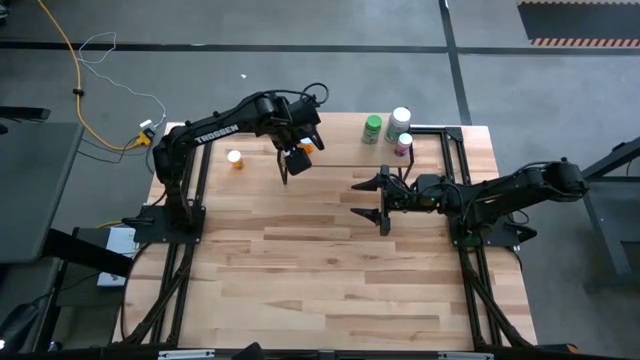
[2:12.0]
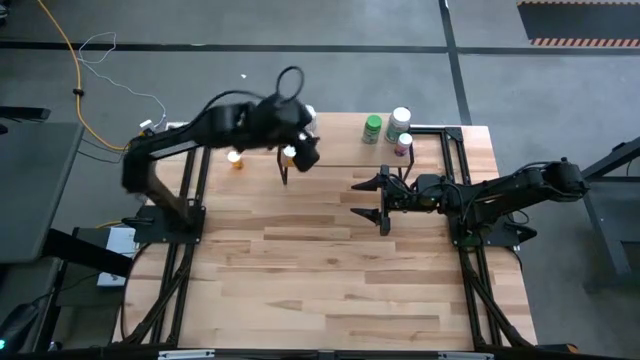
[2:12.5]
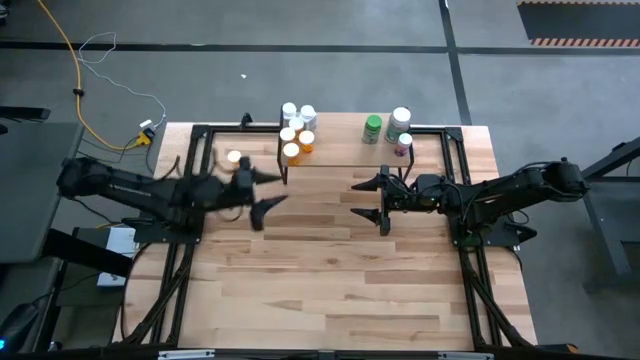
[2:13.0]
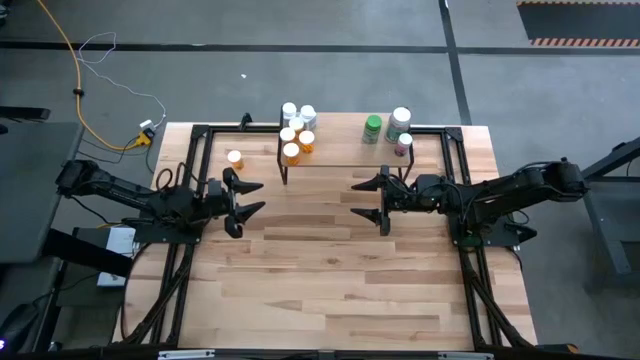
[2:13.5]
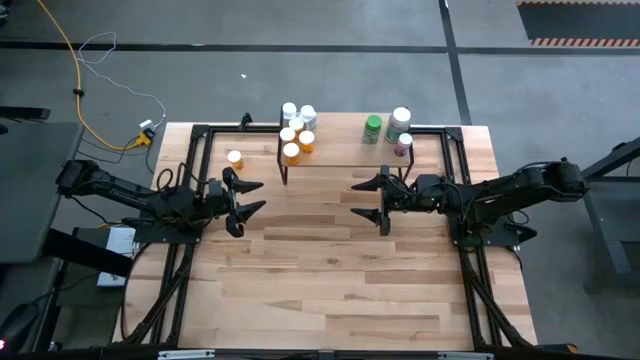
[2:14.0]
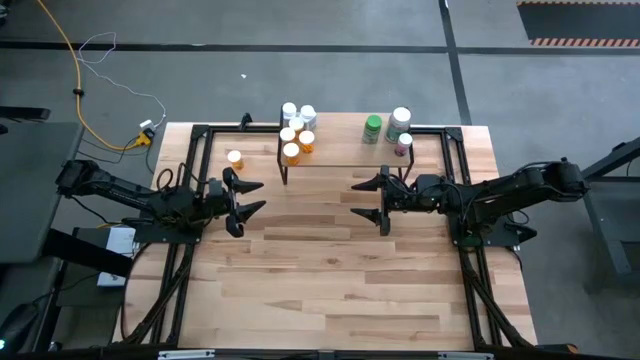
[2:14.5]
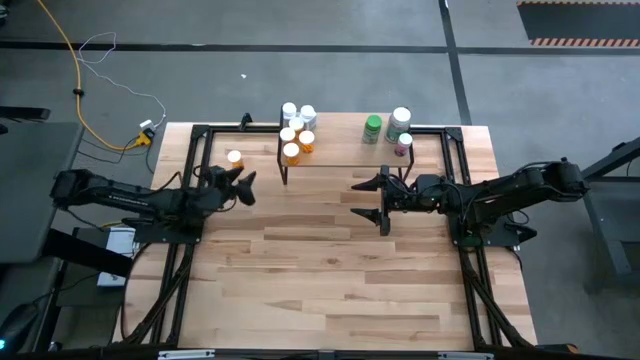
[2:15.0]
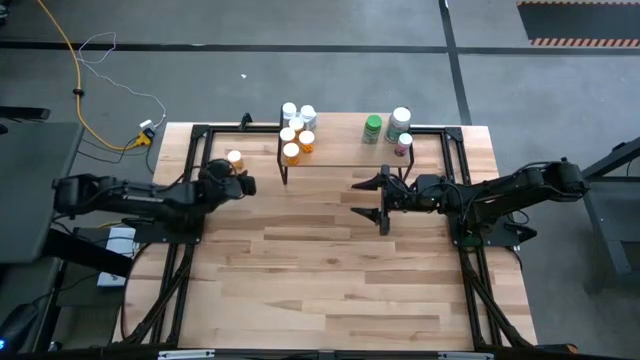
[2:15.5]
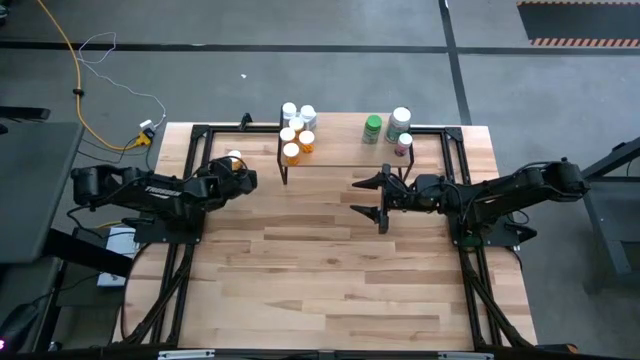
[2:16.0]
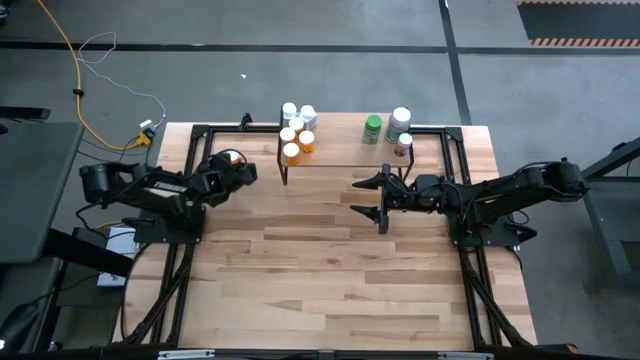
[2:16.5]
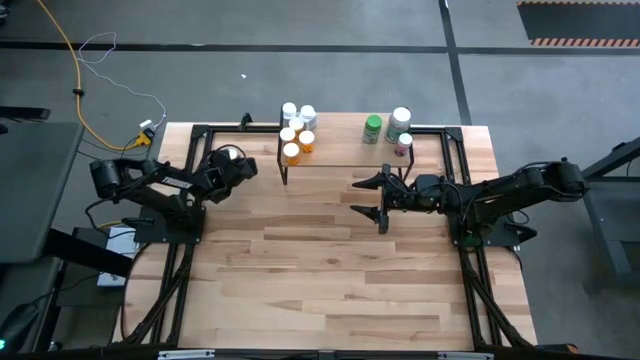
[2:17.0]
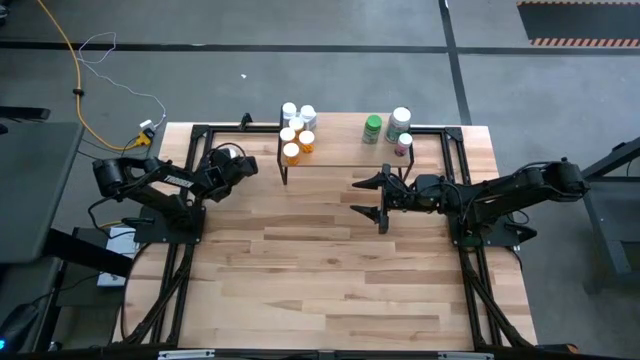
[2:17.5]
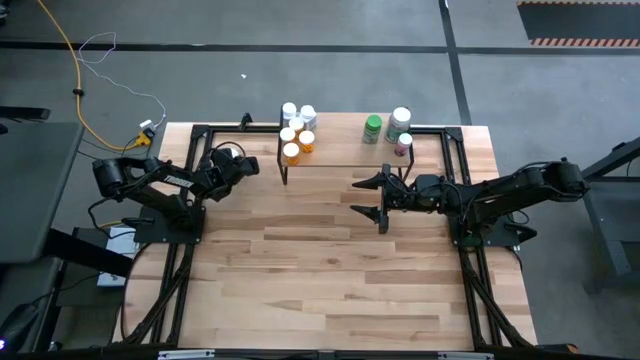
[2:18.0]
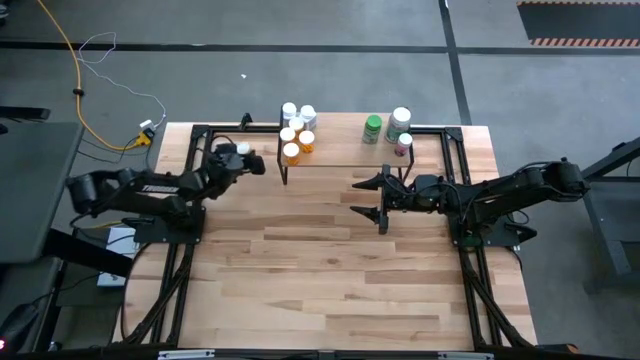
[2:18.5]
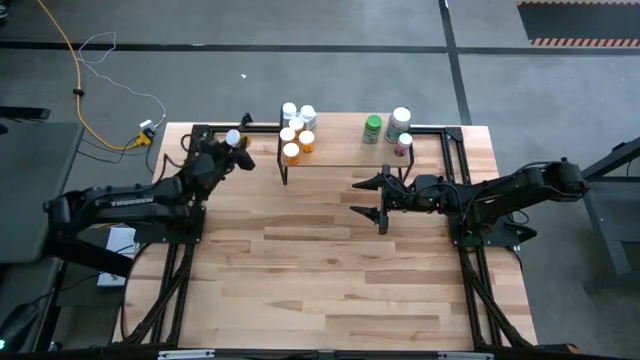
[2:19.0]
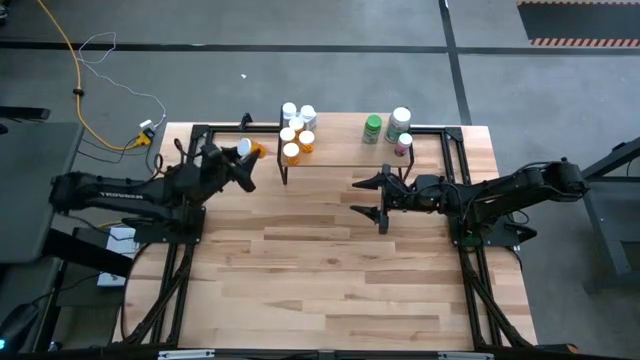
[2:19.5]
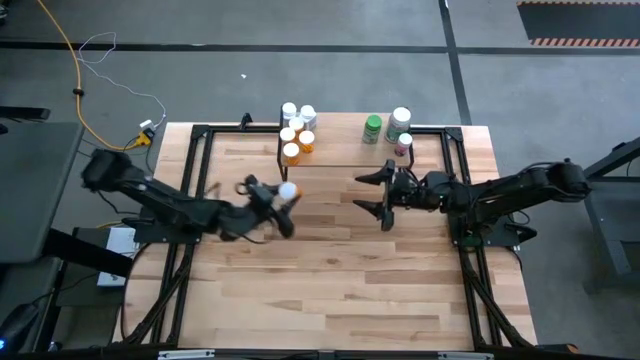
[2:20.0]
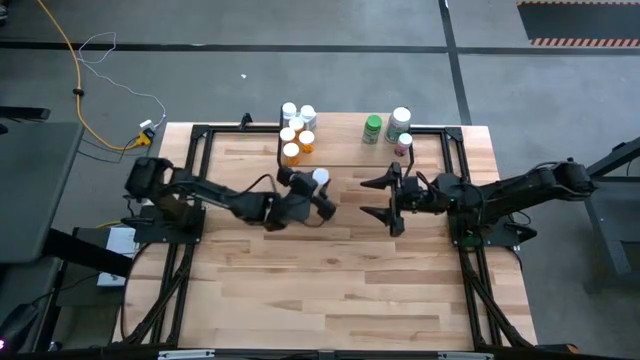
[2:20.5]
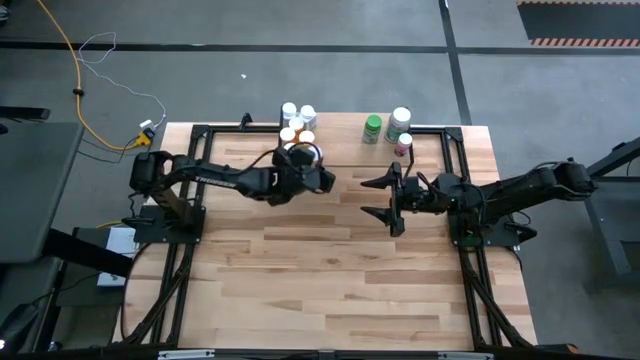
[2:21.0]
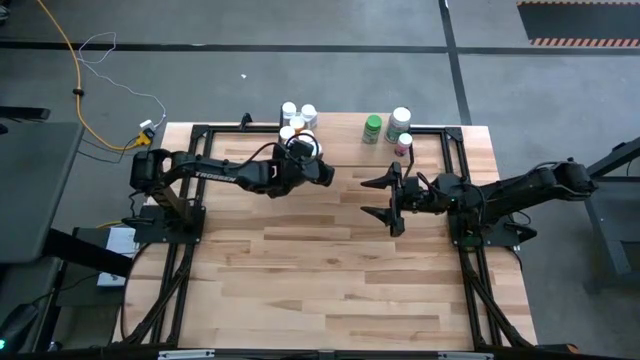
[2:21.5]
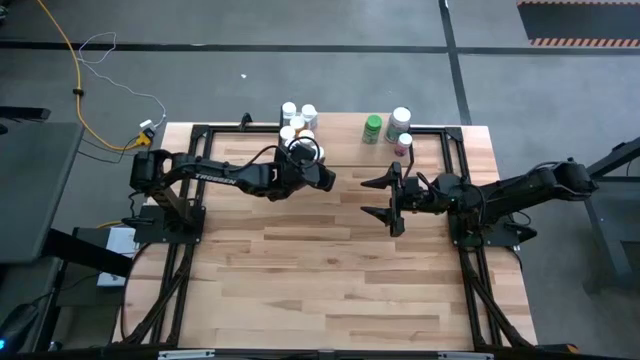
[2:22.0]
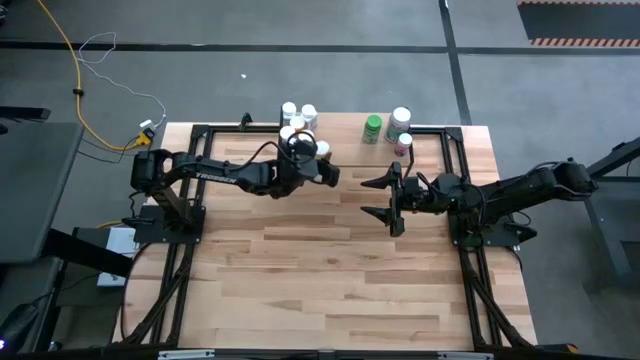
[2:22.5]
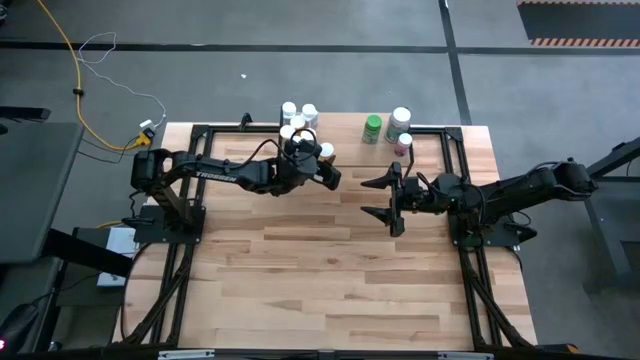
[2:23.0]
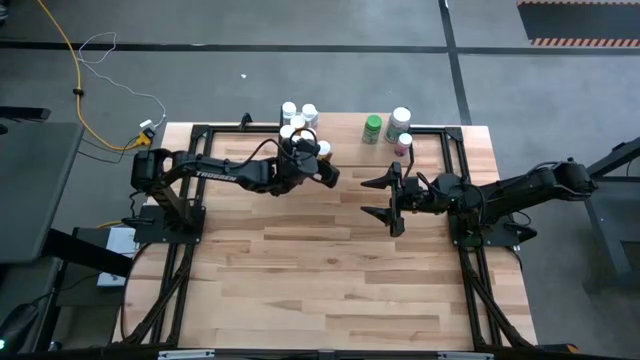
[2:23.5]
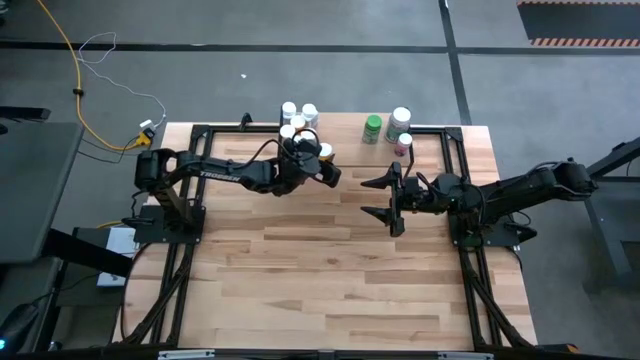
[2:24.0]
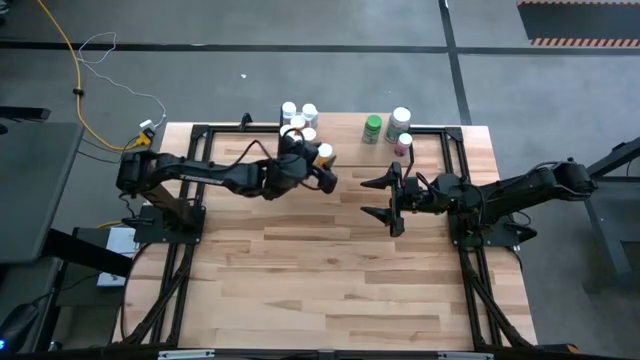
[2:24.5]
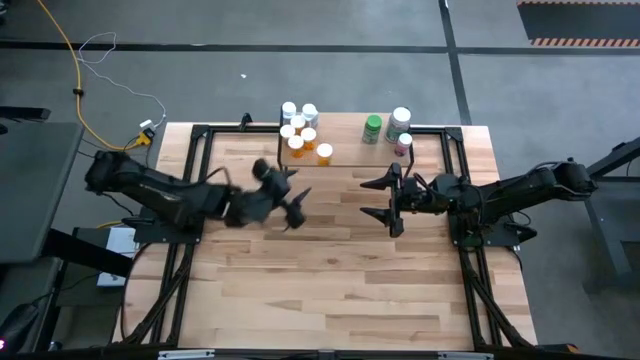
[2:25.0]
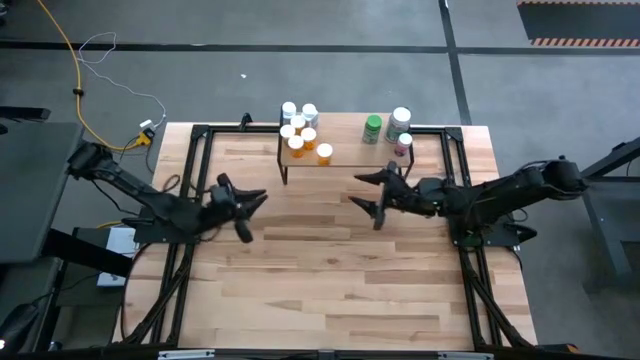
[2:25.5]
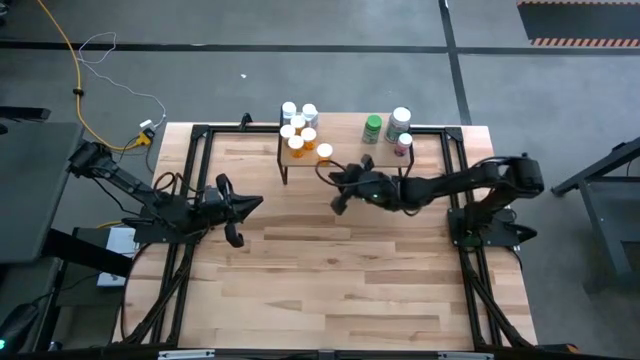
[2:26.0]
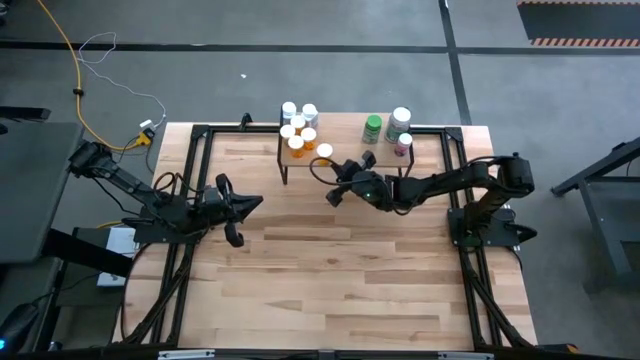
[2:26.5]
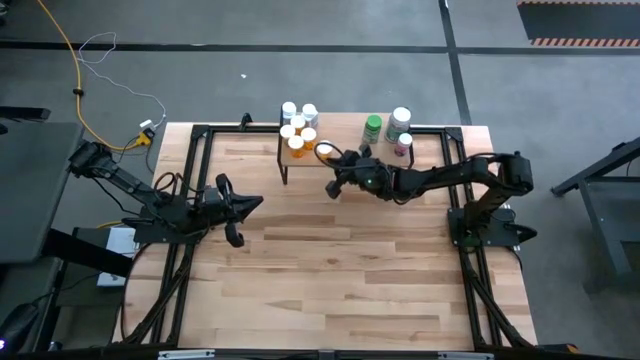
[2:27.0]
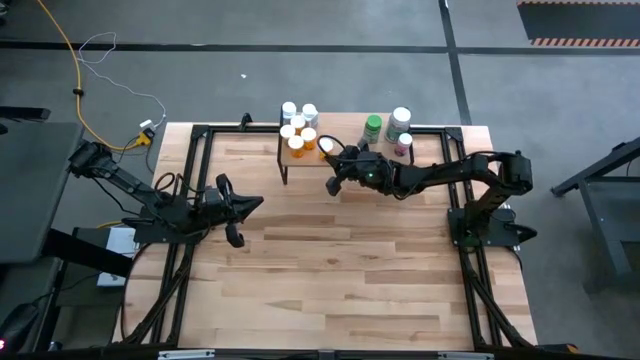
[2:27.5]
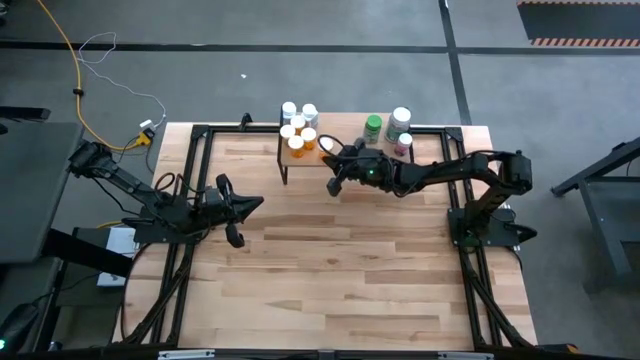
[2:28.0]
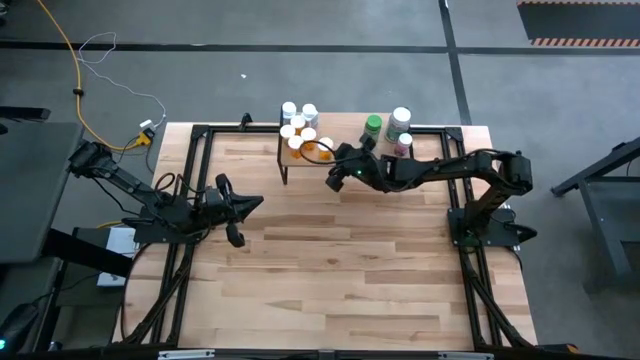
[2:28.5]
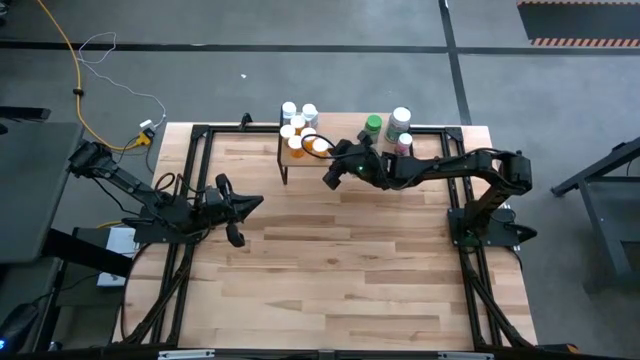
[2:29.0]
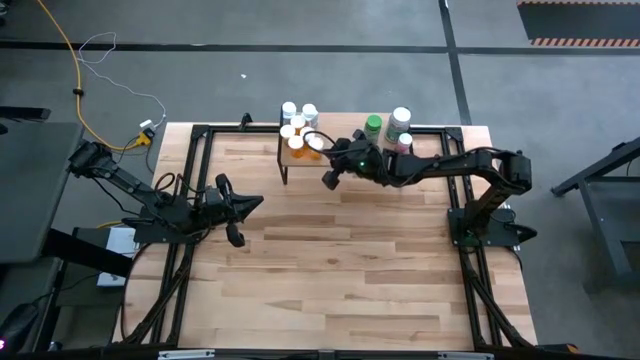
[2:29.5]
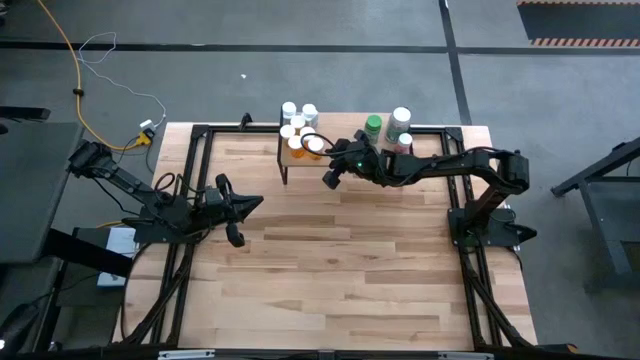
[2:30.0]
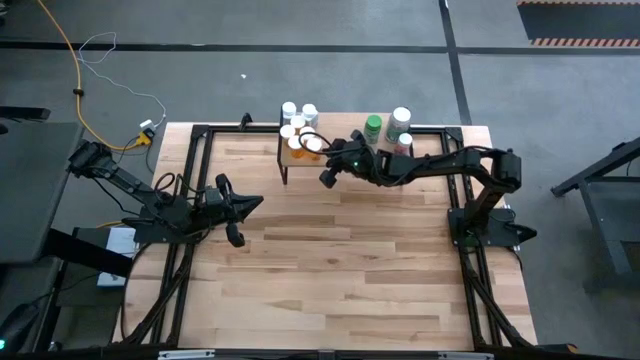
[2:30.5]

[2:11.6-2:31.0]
Task: Pick and place medicine bottles onto shelf by color
Put the orange pill bottle on the shelf

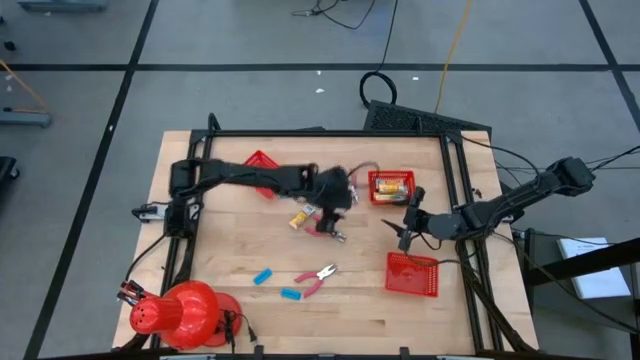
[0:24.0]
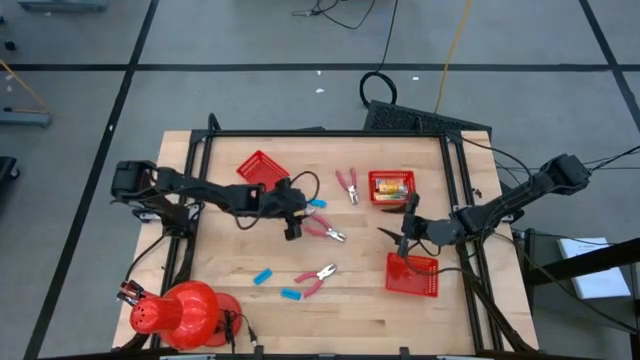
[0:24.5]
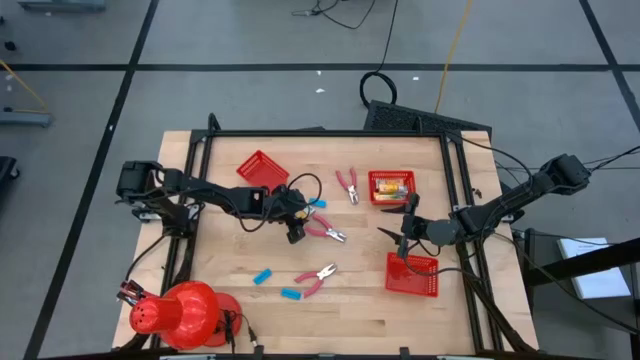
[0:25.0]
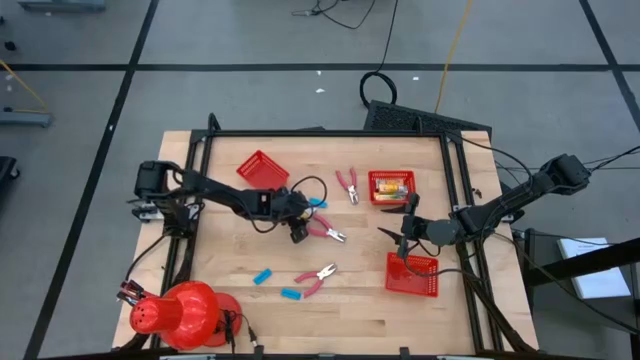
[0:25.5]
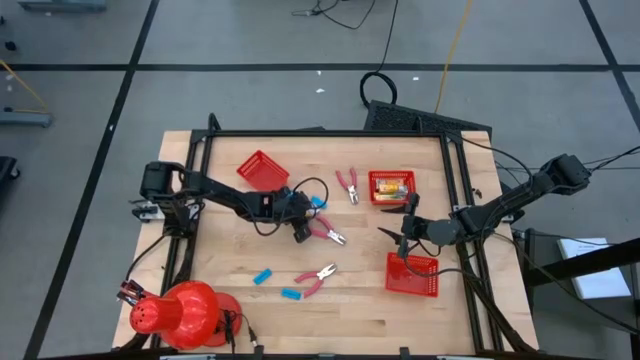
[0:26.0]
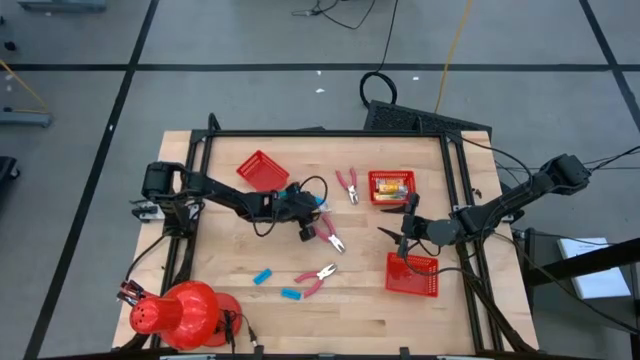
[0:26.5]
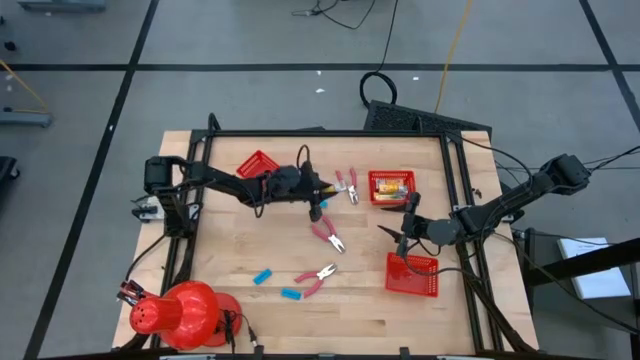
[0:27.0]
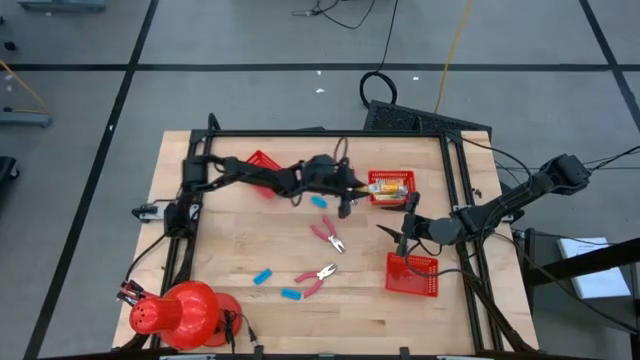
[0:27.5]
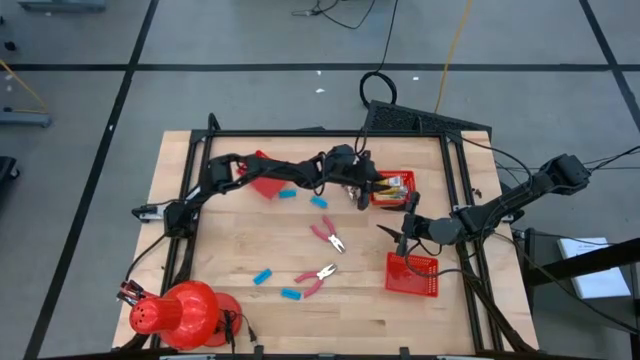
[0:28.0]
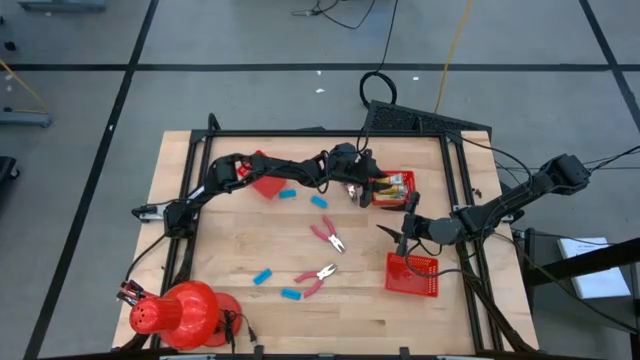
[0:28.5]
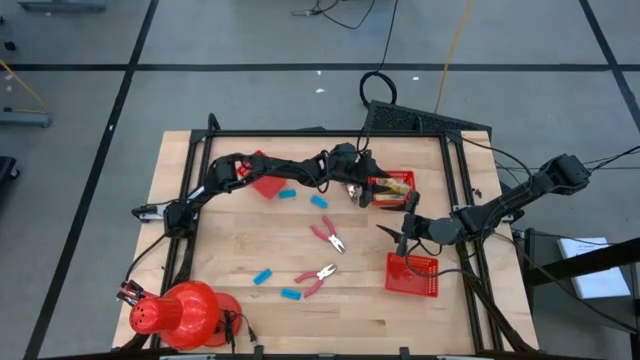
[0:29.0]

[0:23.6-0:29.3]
Task: Pick & Place School Supplies
Put the yellow crayon box into the top right red bin
